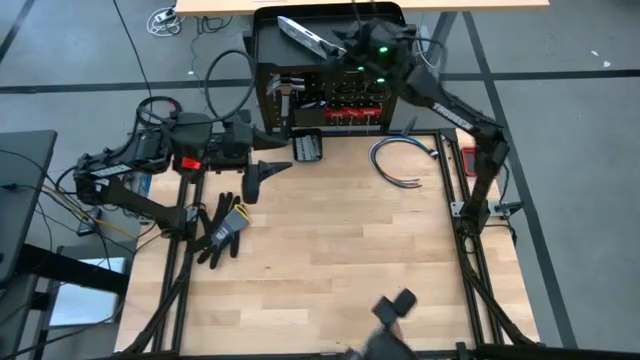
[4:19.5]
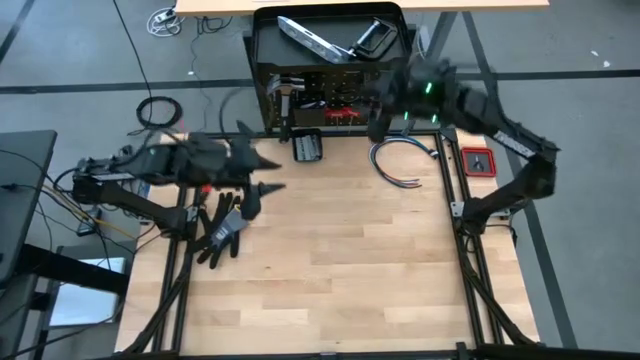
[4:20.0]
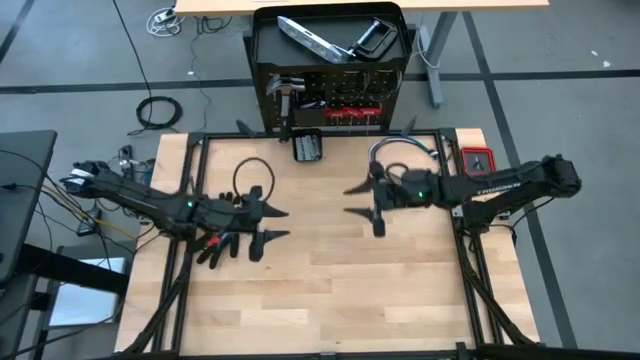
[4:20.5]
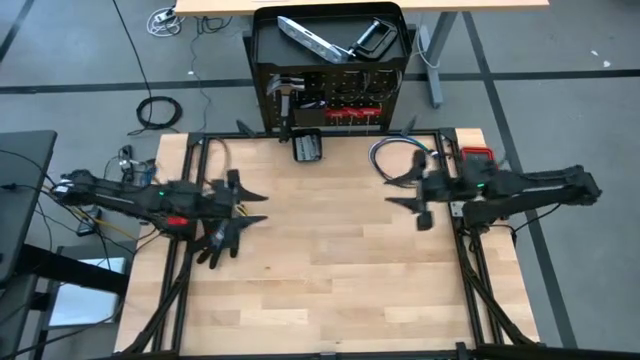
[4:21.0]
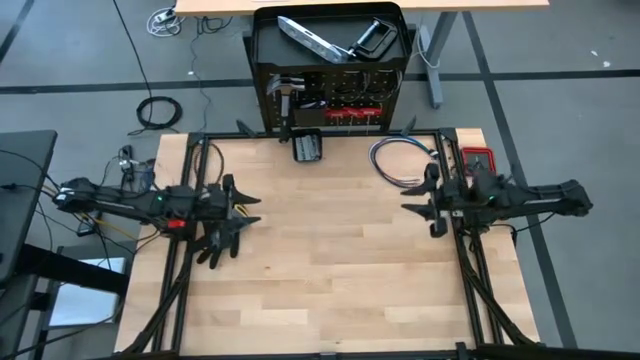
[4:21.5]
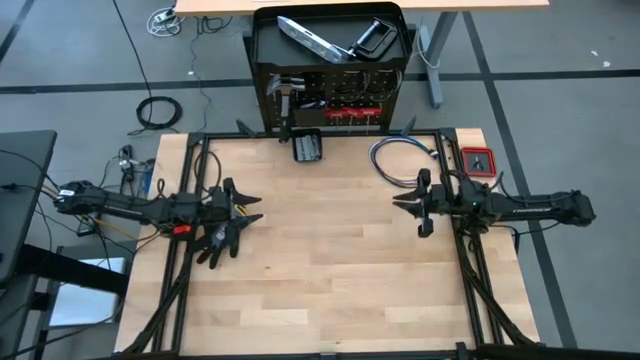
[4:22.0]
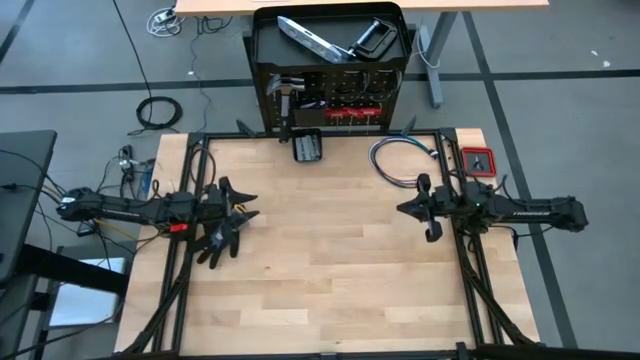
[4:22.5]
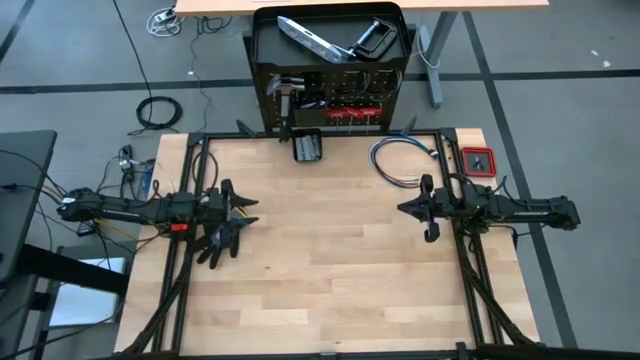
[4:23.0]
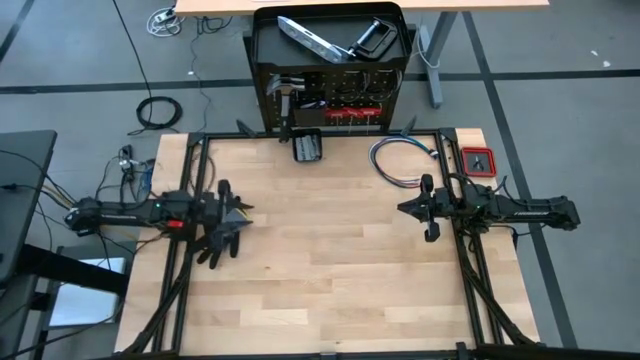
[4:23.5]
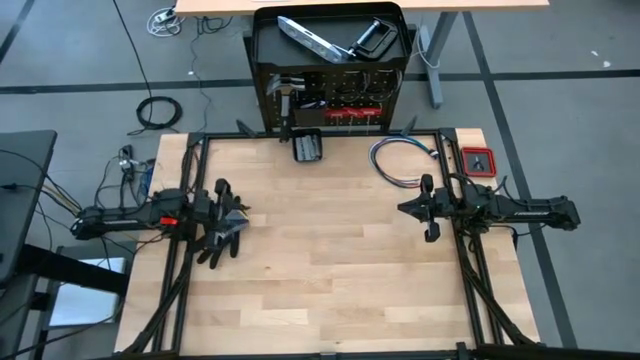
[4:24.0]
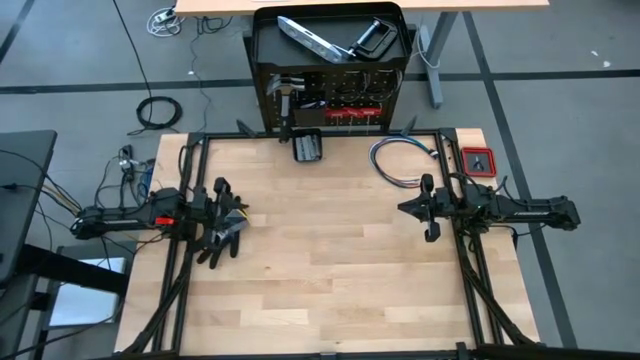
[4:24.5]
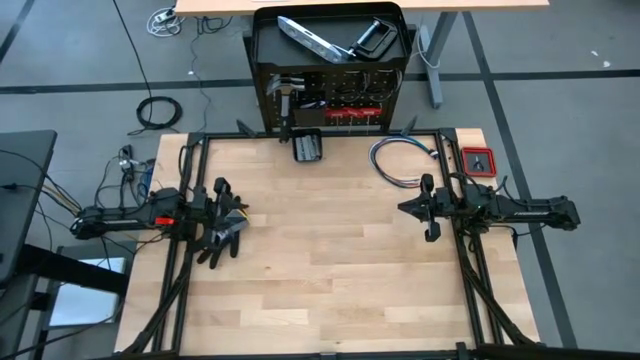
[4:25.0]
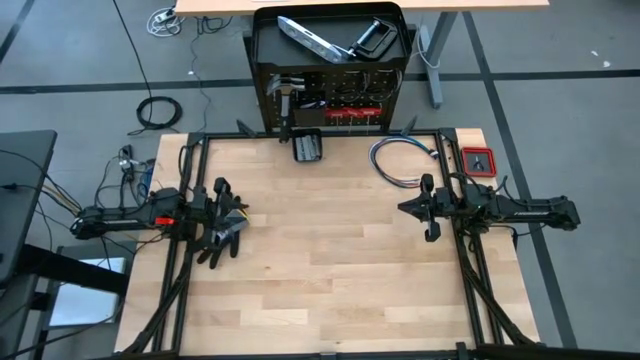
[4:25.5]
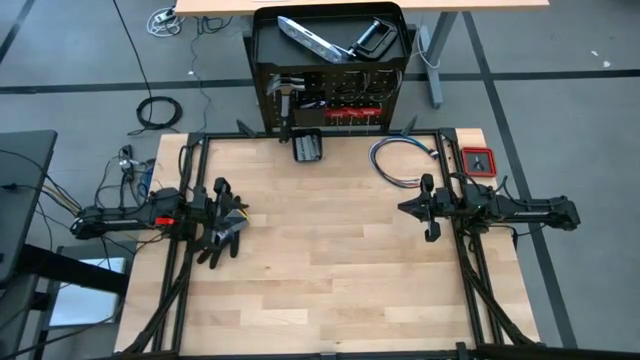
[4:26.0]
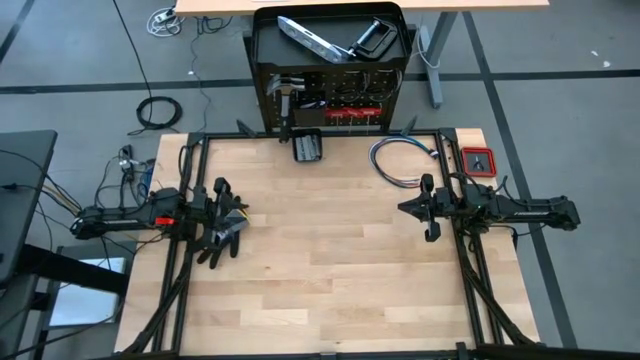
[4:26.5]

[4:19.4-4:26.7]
Task: Hang tools onto peg board
Return to Home Position
